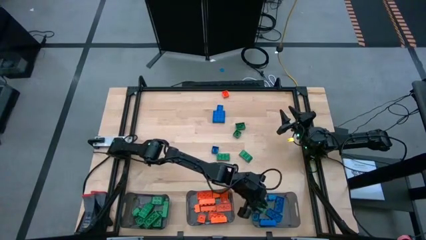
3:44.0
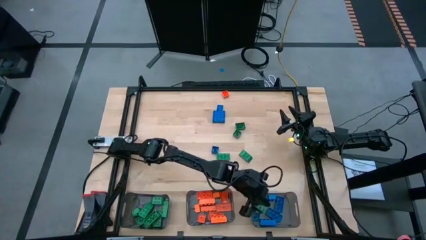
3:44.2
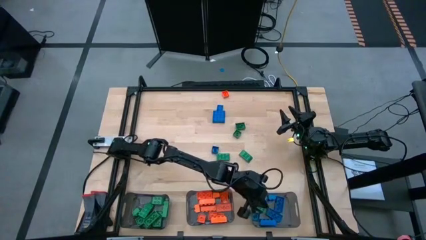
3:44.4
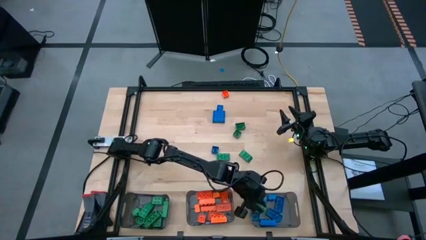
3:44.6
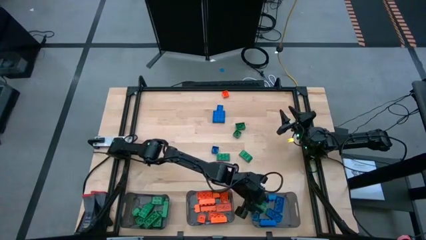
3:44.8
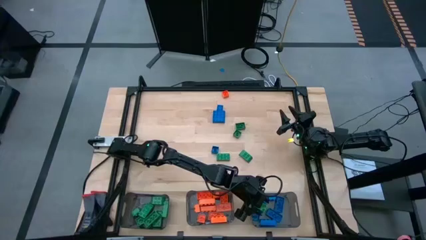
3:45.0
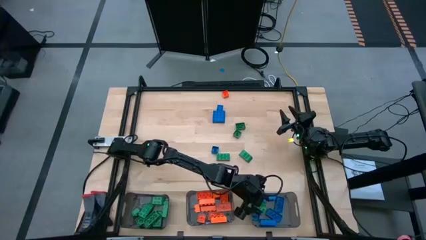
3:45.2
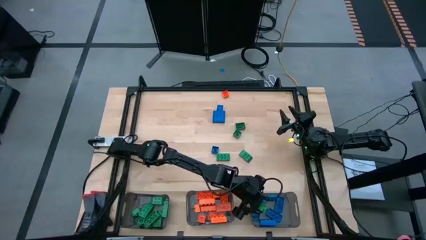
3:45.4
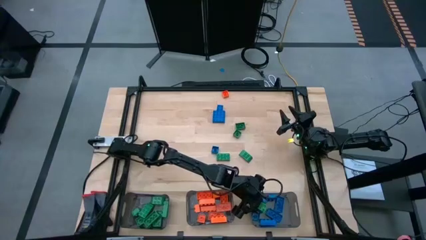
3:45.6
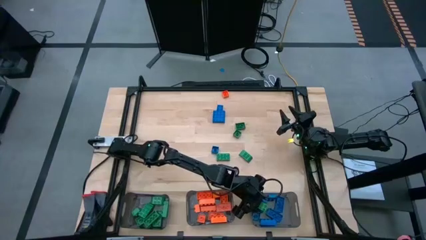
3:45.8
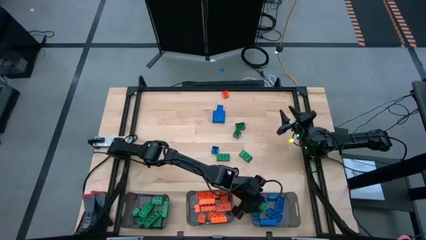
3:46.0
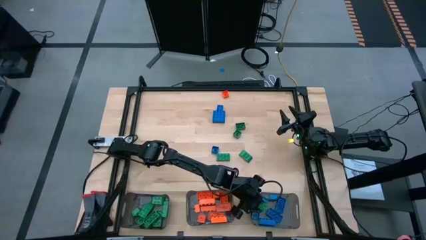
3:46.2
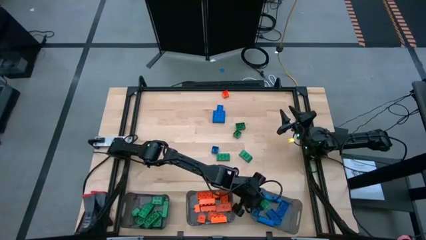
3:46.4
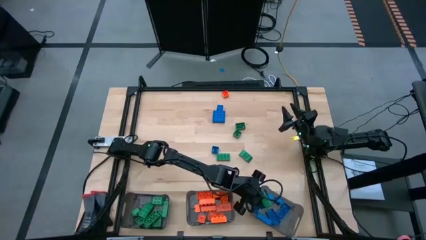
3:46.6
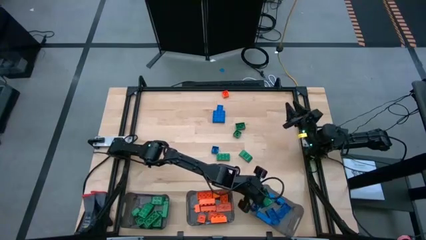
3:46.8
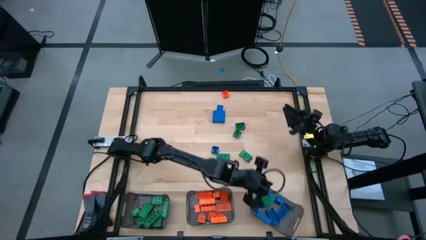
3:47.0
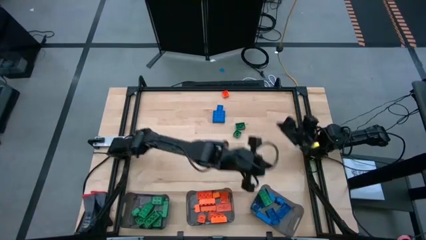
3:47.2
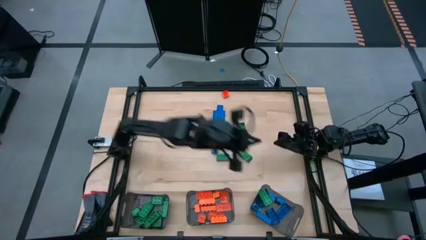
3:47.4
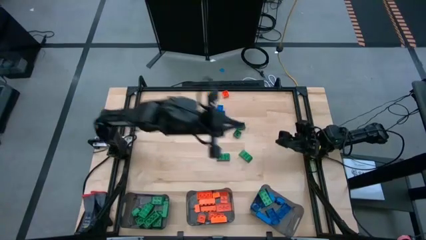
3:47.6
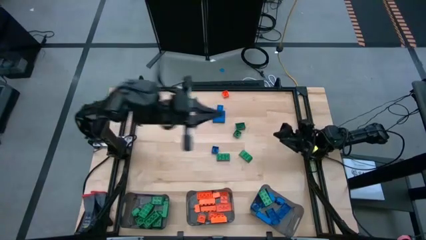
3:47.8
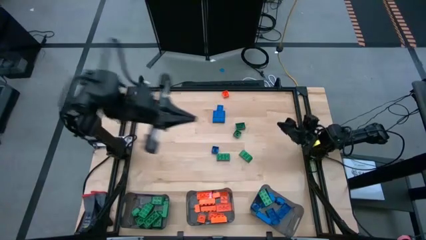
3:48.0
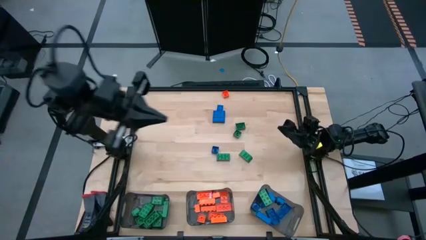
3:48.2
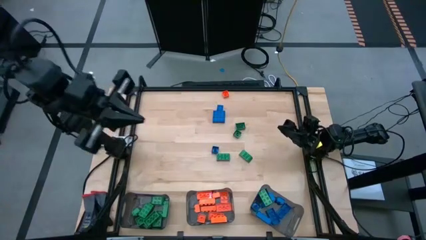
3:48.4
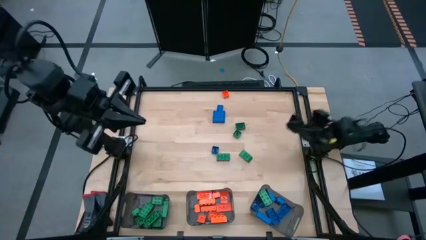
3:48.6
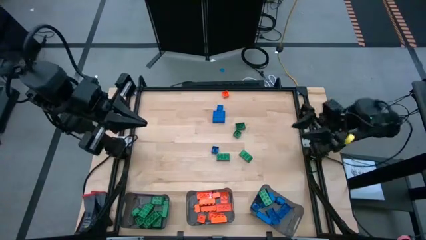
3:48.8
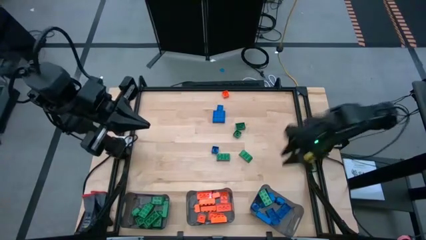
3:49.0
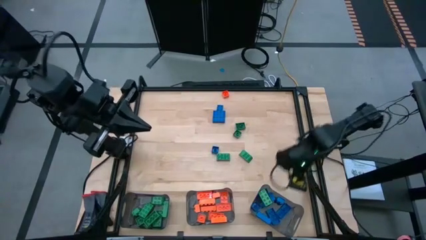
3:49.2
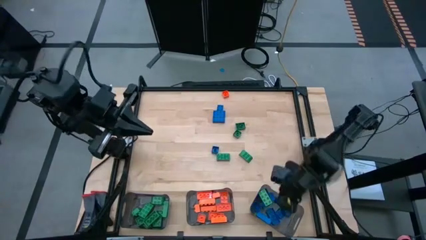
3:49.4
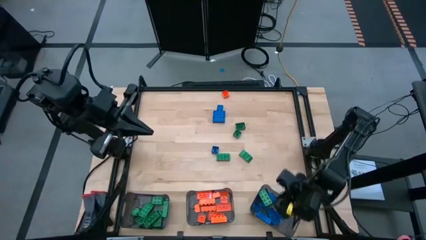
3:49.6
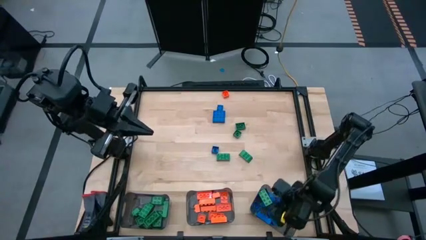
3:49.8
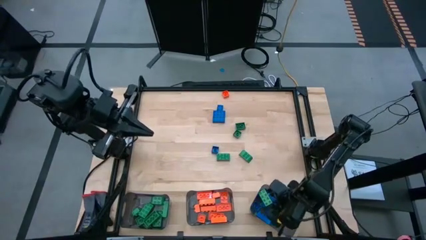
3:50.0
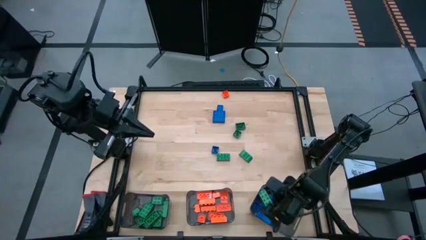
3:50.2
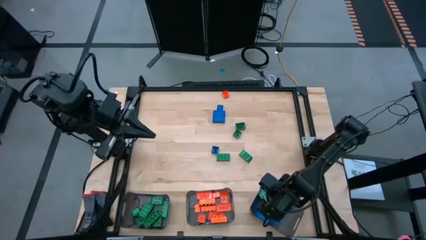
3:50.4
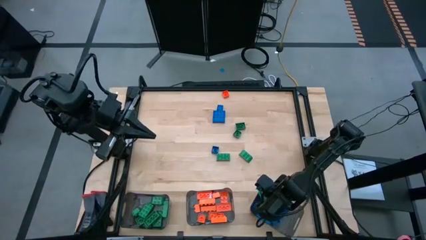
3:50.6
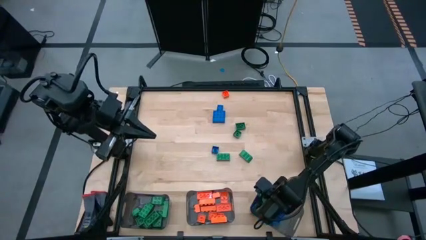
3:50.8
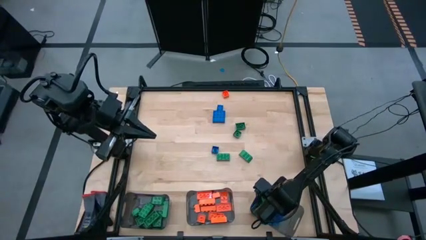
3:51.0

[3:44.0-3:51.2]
Task: Sort blocks
Put the green game piece into the left black bin

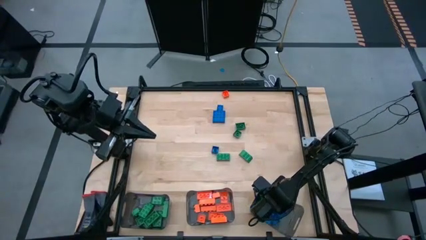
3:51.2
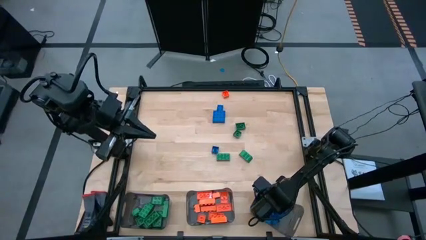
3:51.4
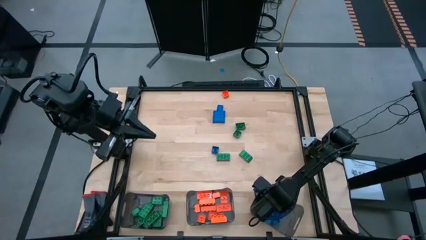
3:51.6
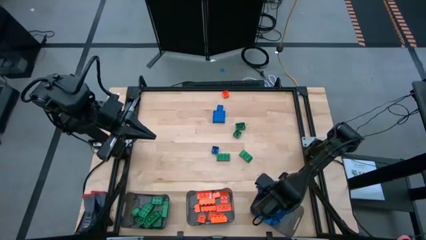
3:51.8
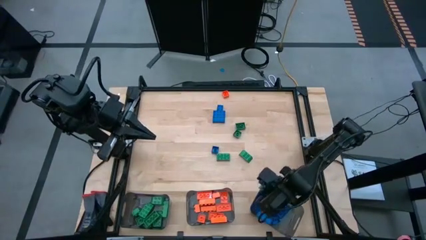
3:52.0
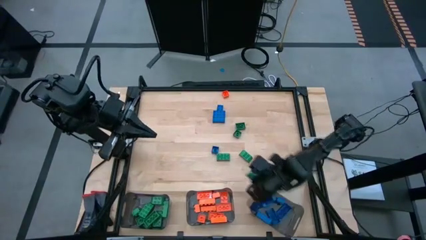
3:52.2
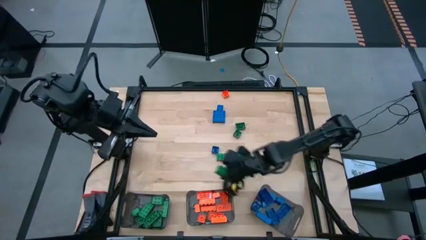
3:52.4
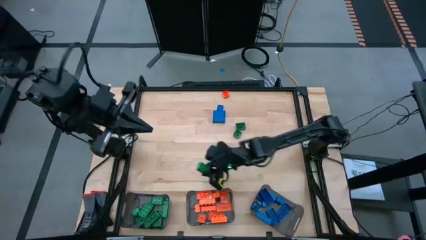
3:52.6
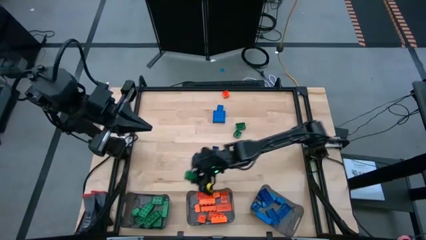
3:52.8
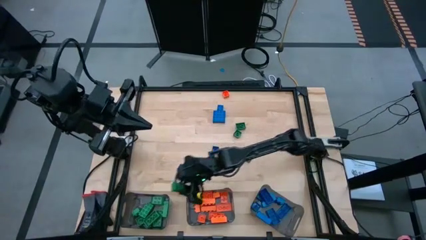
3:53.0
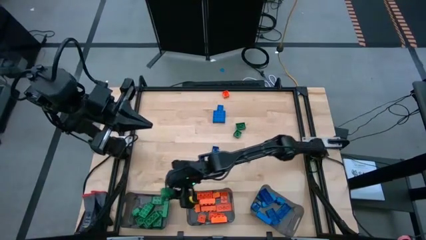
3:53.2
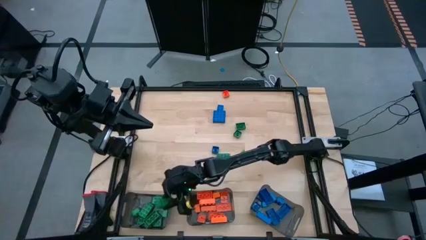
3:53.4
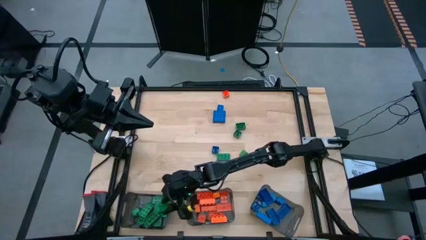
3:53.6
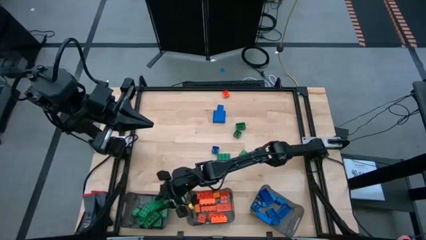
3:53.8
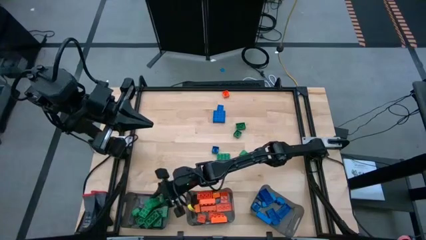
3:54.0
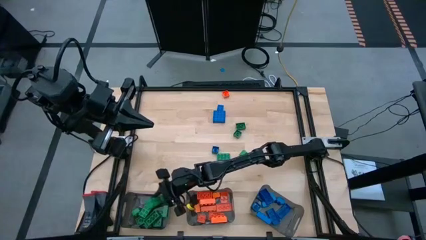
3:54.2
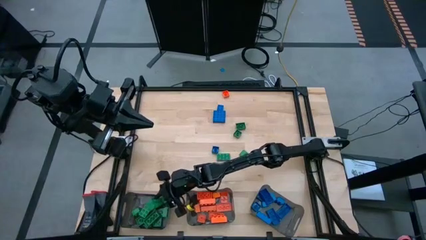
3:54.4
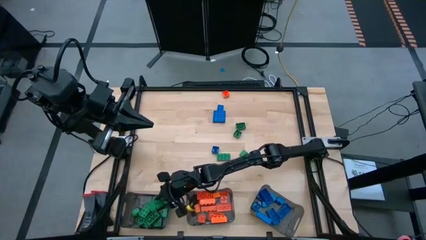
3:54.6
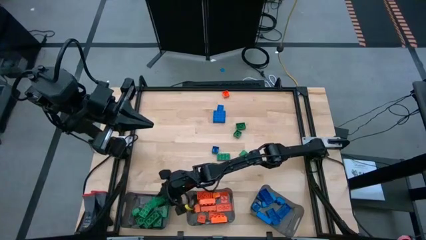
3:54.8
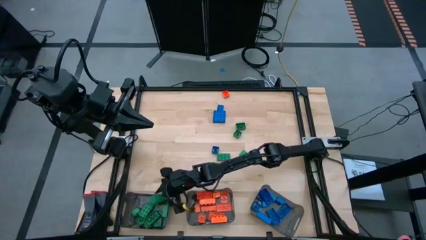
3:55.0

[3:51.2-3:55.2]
Put the green game piece into the left black bin

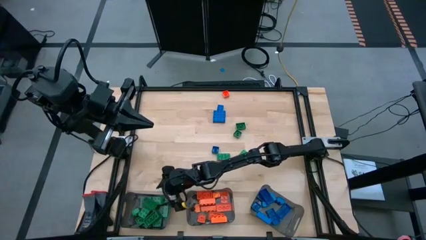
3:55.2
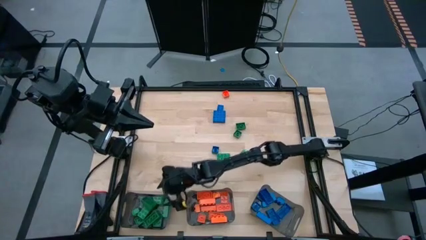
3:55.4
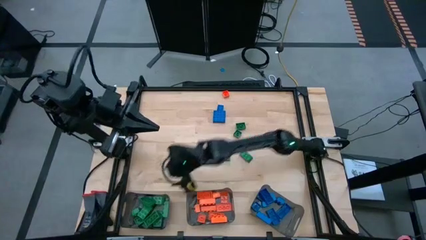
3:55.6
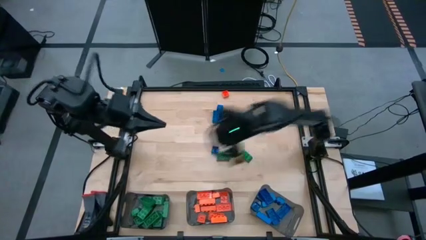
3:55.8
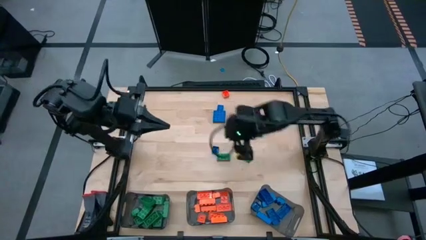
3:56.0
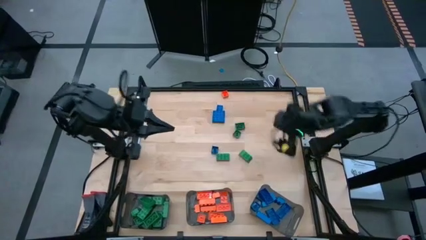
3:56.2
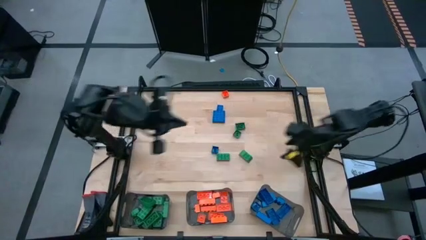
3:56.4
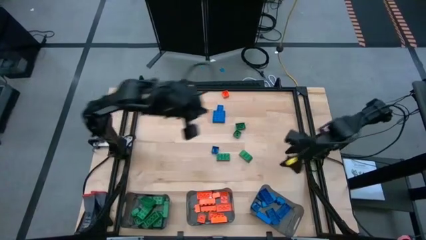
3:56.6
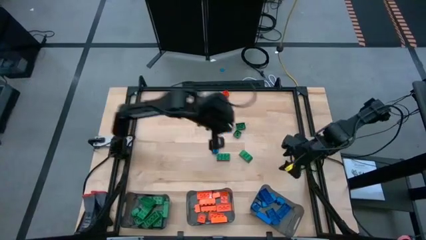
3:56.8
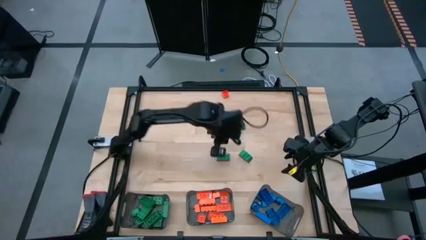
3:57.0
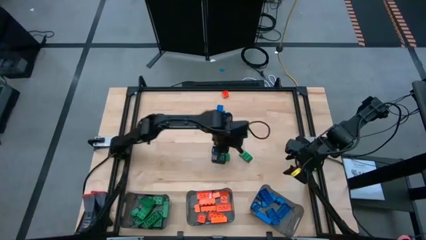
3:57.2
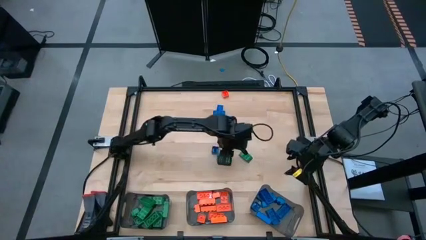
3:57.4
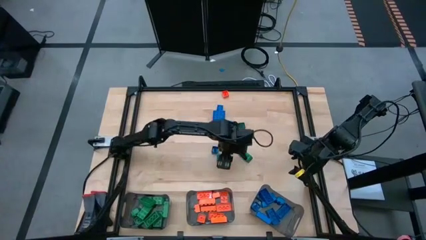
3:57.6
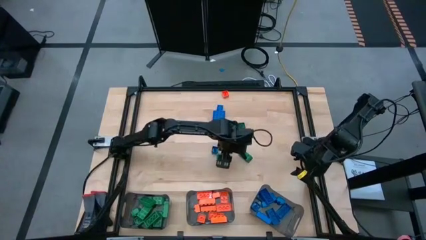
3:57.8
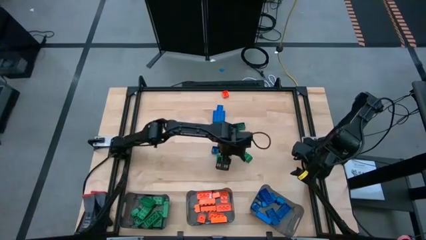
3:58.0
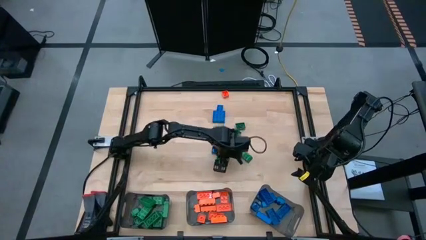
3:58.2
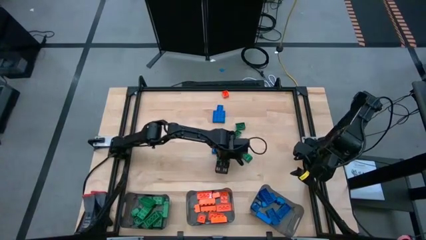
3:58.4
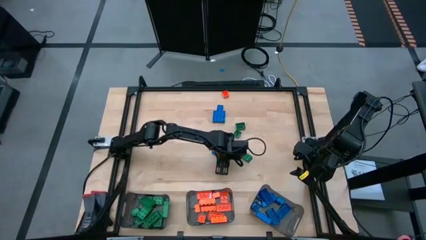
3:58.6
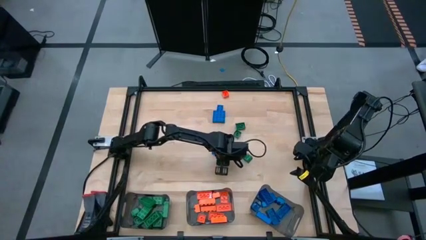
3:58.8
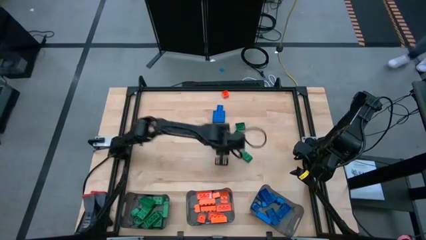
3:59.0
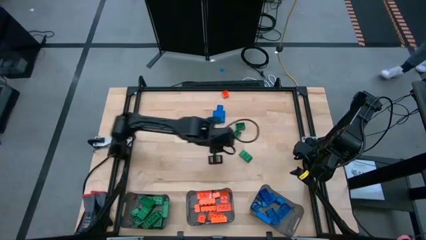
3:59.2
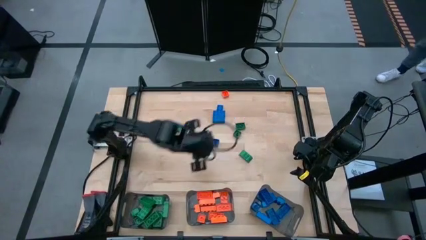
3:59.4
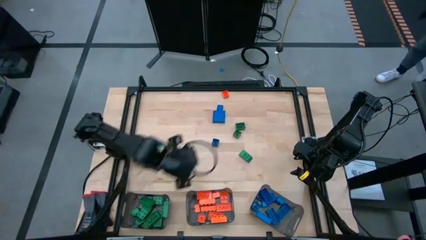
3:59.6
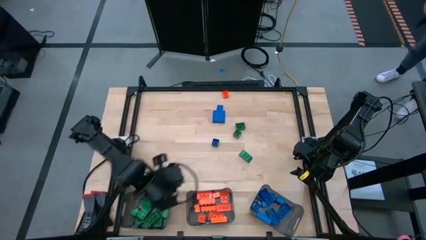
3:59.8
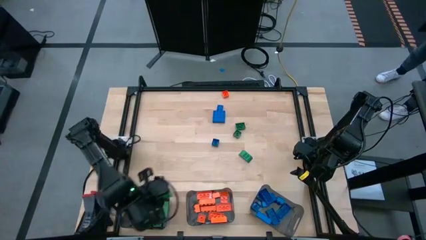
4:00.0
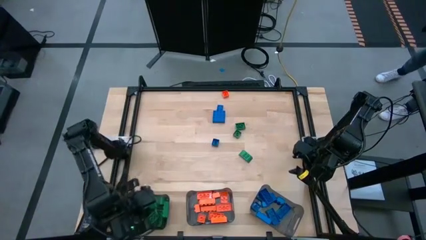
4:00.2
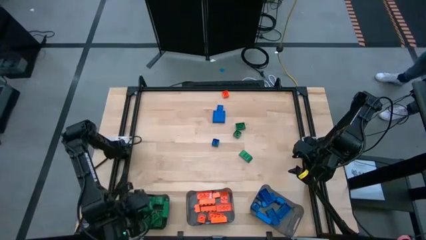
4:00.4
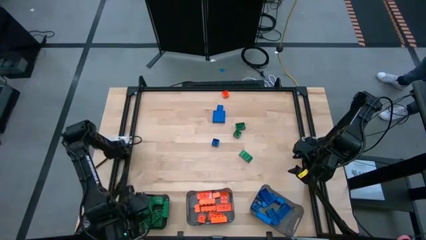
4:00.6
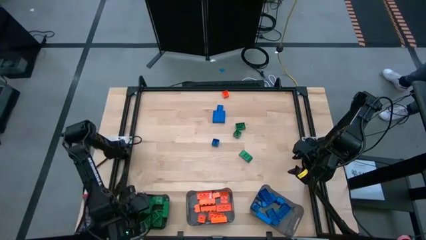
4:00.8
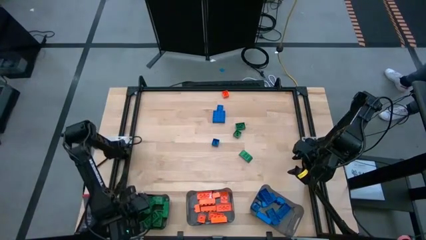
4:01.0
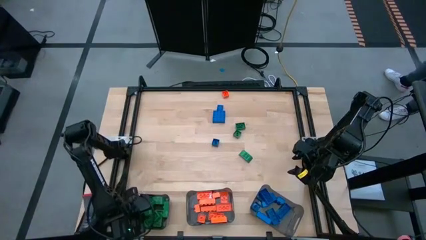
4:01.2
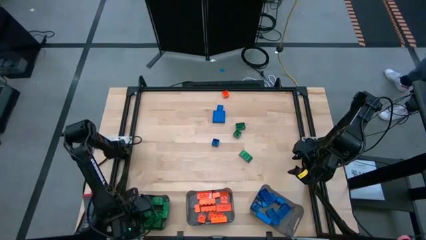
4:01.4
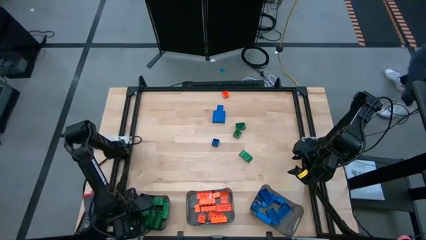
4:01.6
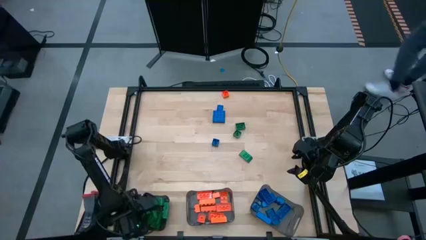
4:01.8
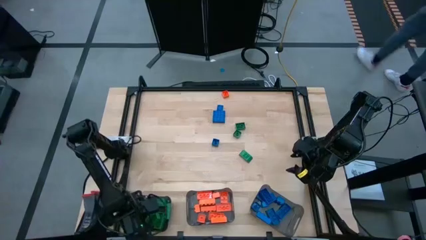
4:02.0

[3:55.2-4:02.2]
Put the green game piece into the left black bin
